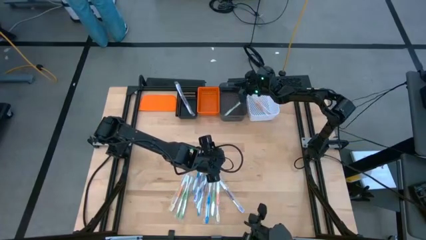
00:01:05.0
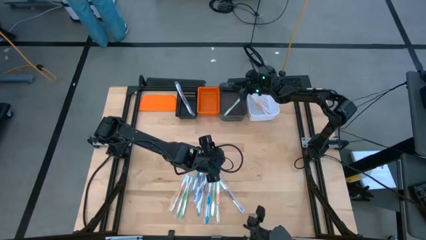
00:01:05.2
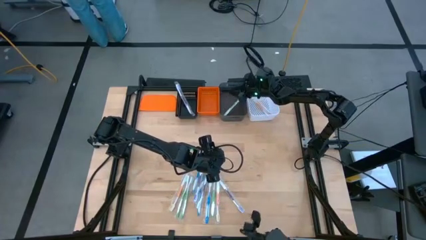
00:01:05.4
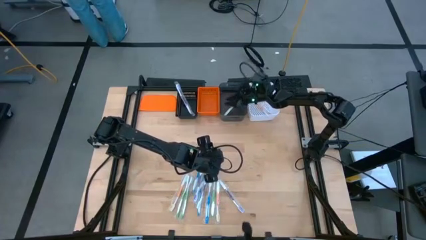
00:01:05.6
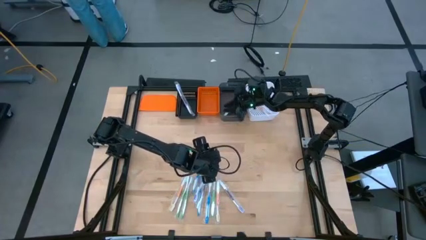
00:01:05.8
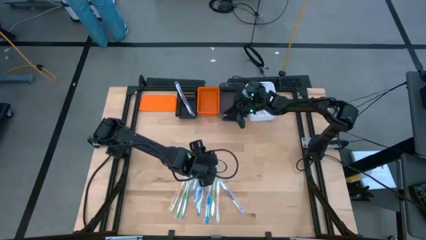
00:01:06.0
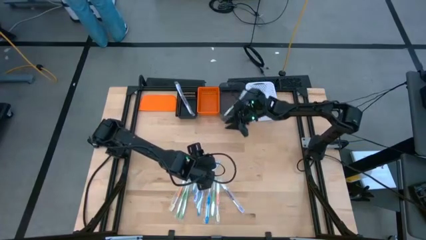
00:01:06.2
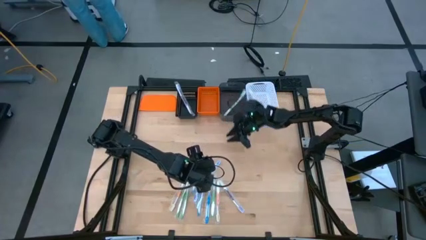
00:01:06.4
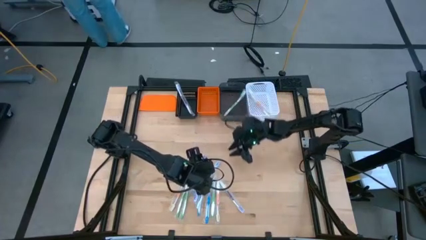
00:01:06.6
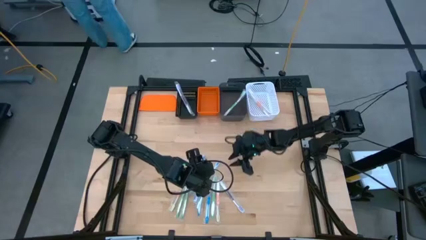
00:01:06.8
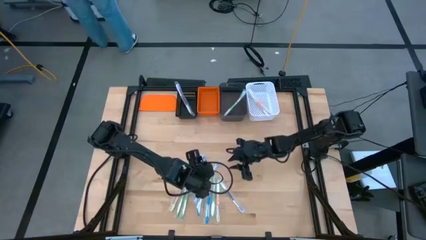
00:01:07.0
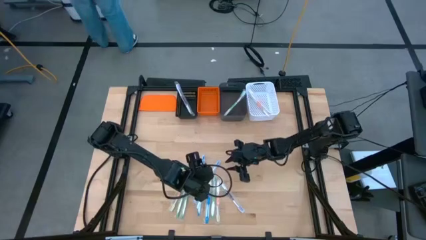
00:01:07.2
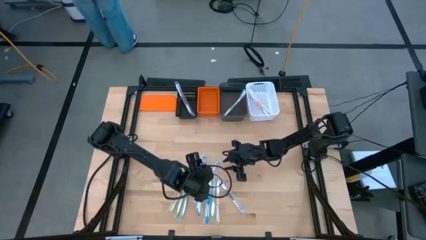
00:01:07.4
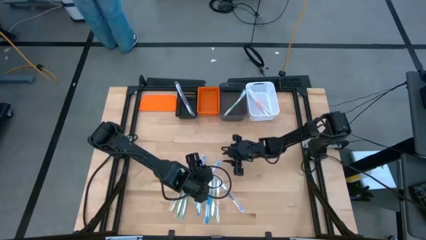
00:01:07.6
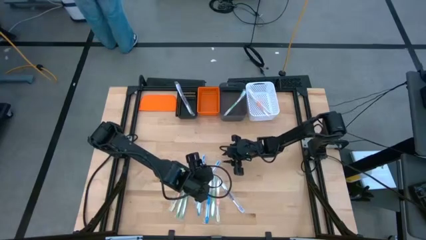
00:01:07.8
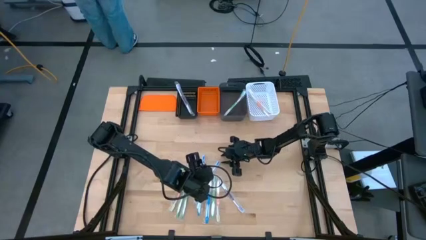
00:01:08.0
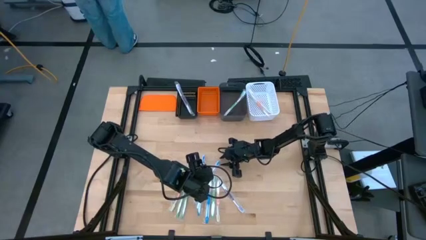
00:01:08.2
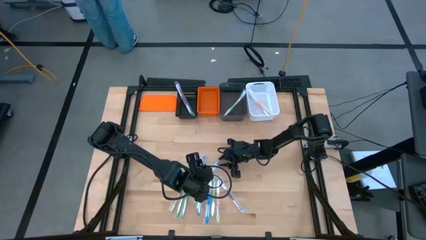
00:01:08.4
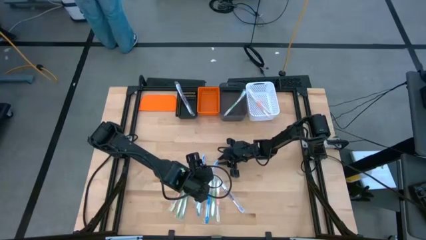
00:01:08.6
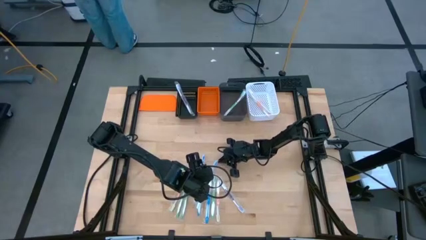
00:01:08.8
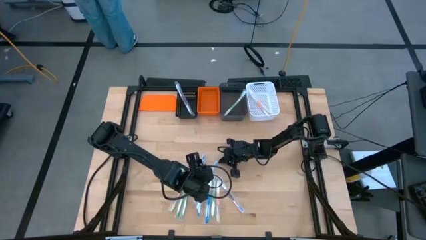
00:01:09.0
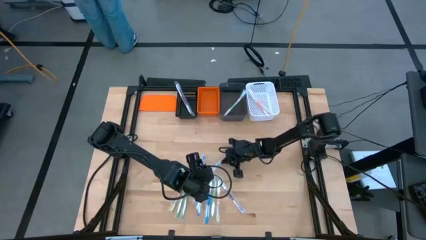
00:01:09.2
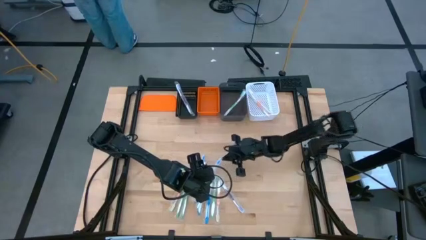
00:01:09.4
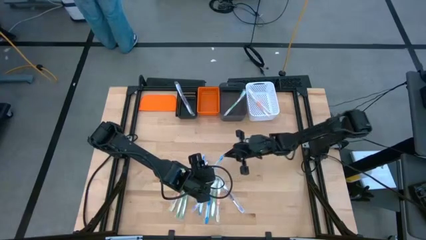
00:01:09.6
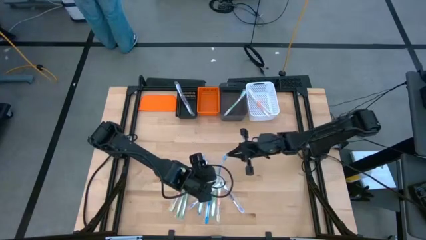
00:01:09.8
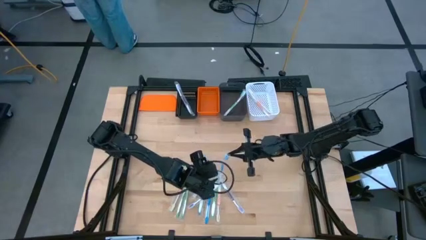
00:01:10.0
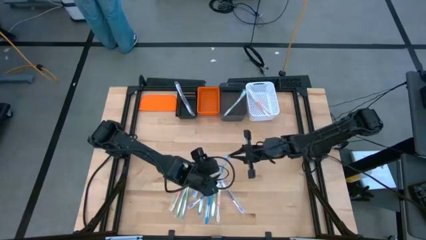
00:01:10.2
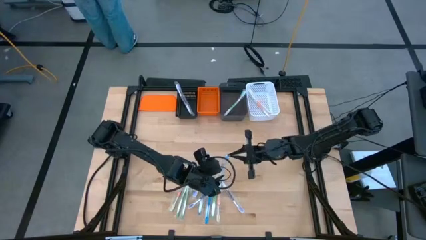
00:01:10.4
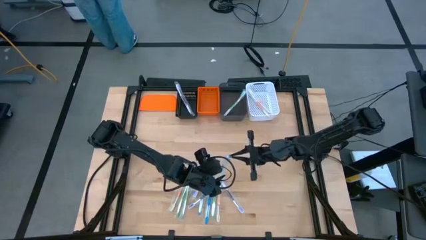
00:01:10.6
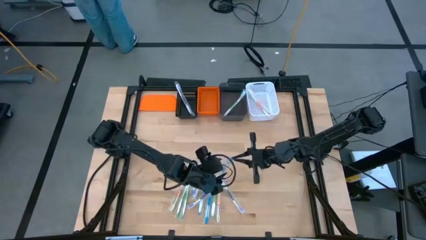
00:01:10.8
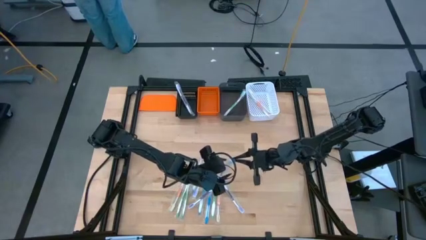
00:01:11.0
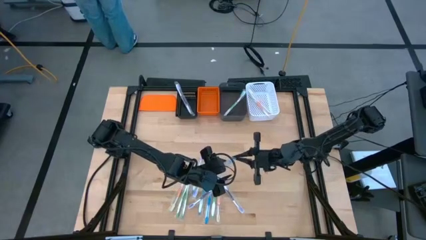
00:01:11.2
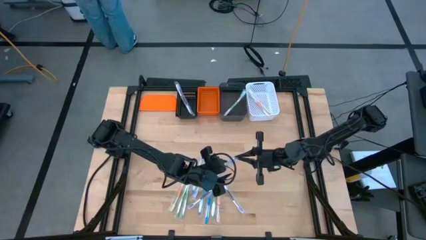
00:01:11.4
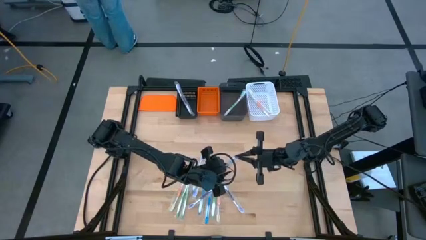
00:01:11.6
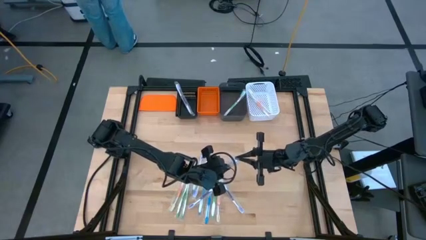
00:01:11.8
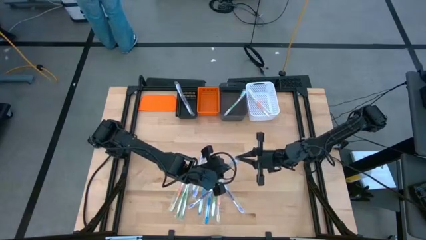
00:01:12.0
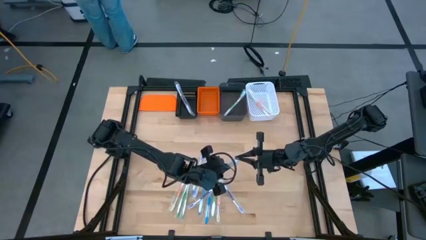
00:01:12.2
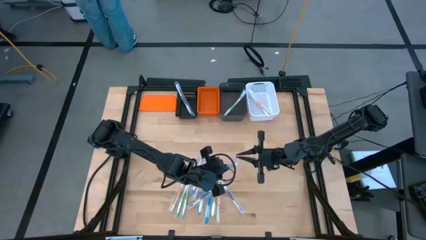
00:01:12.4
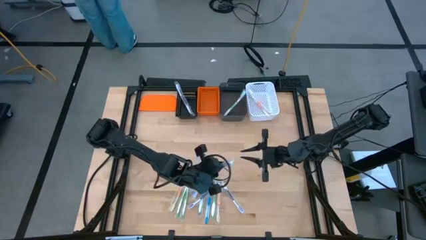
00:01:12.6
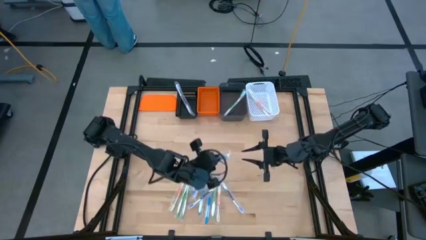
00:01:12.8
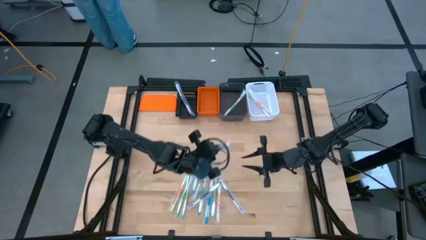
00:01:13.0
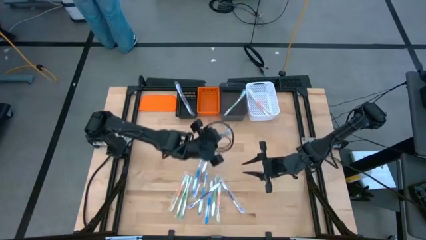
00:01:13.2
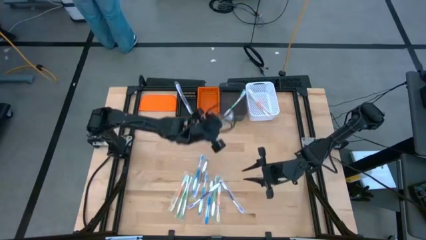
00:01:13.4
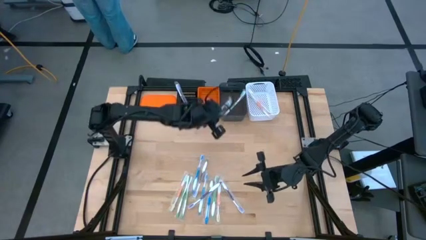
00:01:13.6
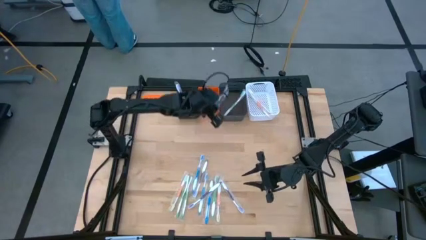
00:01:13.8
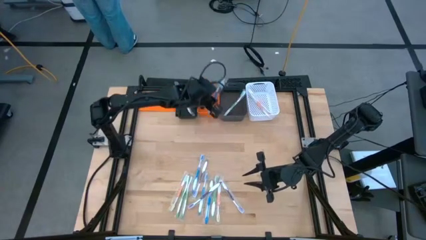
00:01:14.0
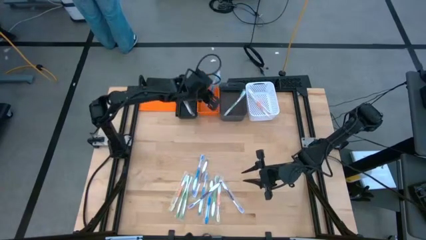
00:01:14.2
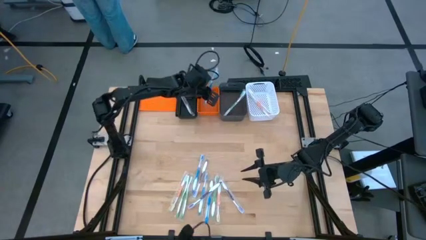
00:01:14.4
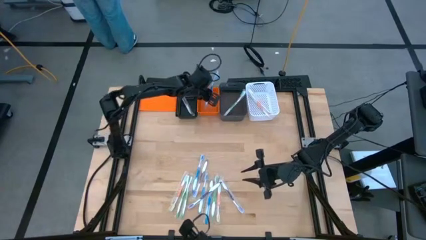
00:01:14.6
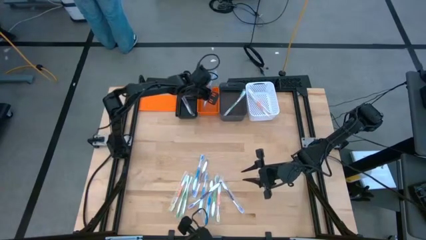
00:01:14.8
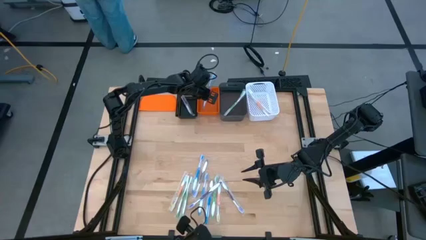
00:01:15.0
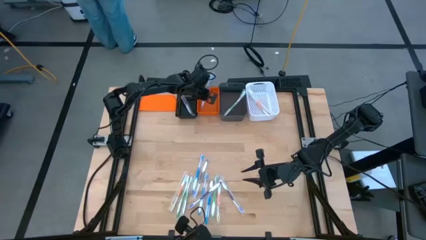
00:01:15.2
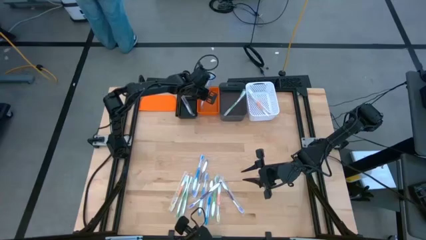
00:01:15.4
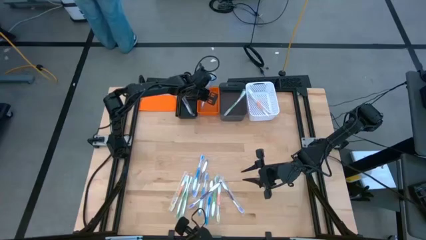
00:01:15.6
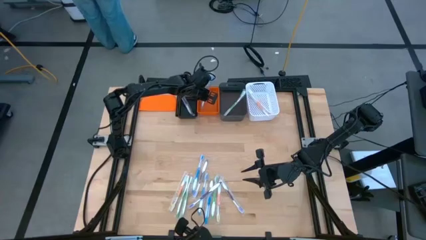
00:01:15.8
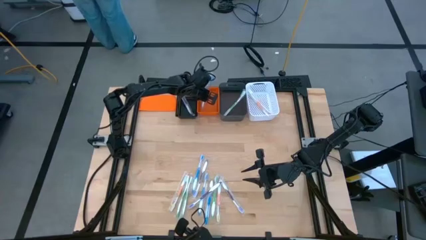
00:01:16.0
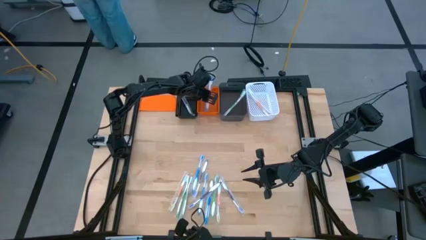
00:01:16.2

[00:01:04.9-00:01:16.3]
Task: Pick & Place Toothbrushes
Put the blue toothbrush into the orange basket

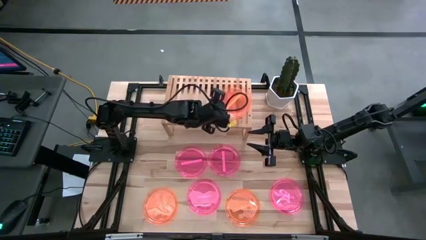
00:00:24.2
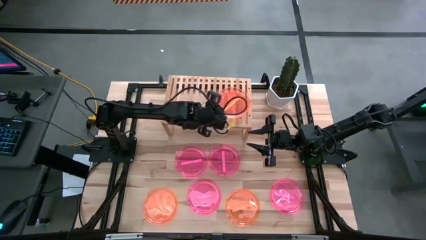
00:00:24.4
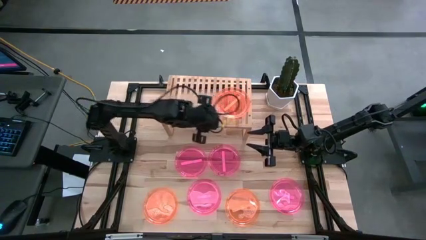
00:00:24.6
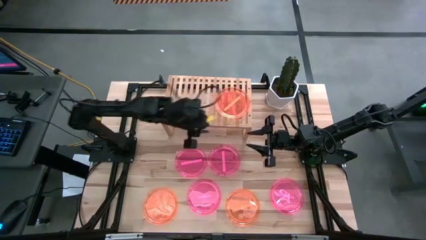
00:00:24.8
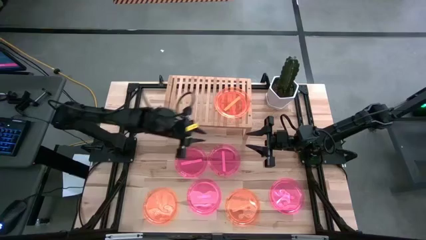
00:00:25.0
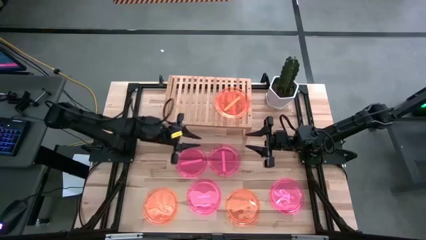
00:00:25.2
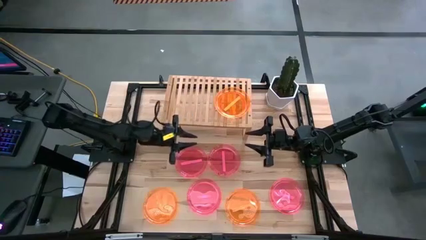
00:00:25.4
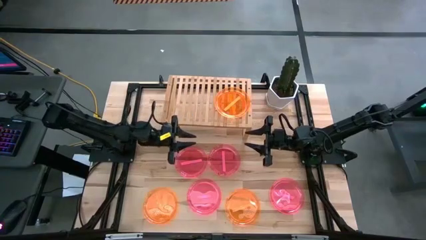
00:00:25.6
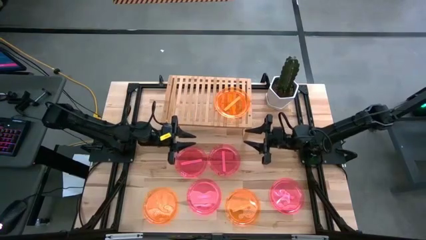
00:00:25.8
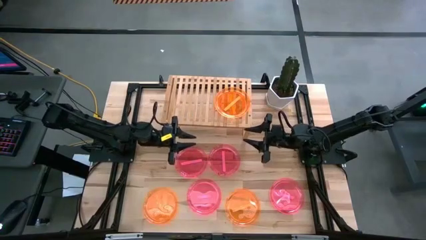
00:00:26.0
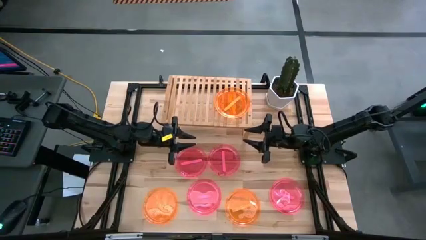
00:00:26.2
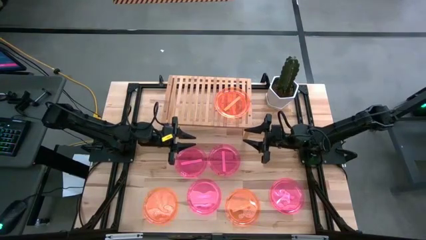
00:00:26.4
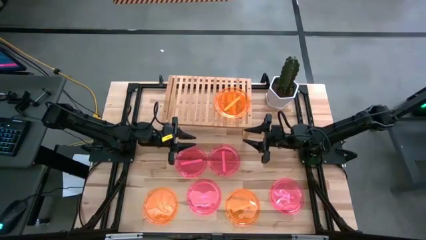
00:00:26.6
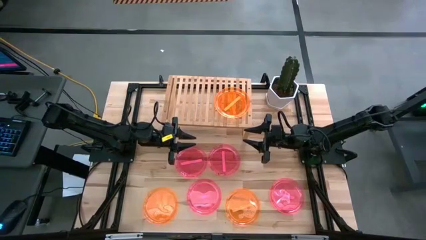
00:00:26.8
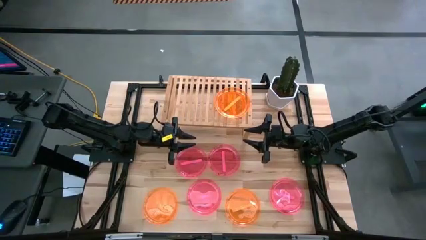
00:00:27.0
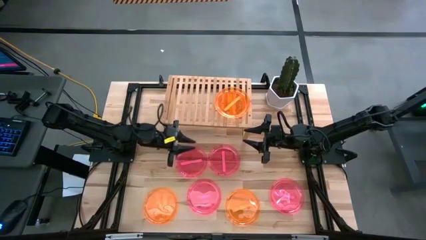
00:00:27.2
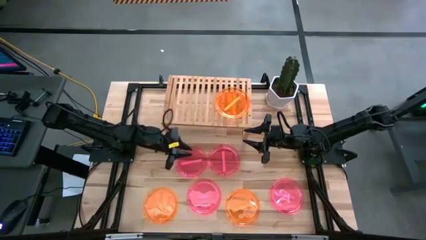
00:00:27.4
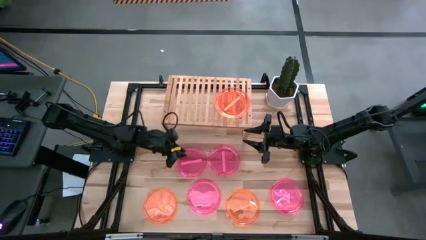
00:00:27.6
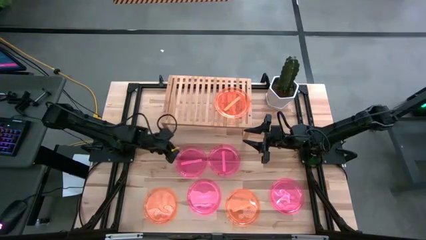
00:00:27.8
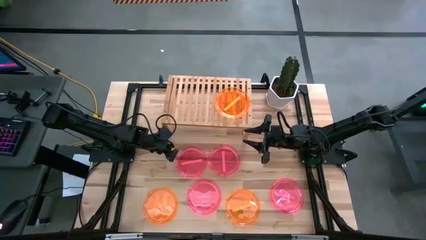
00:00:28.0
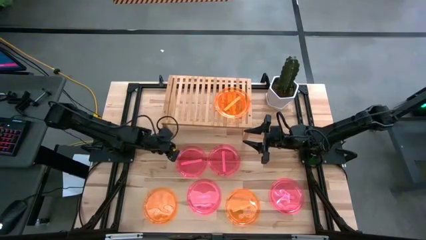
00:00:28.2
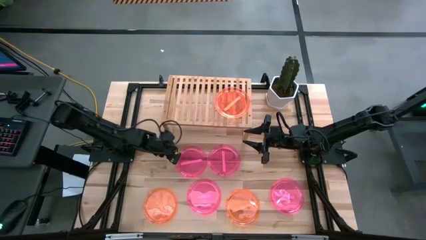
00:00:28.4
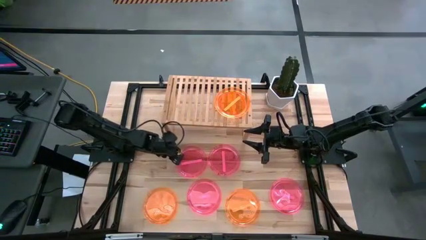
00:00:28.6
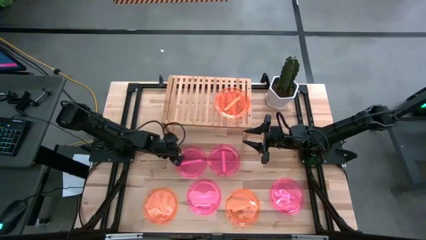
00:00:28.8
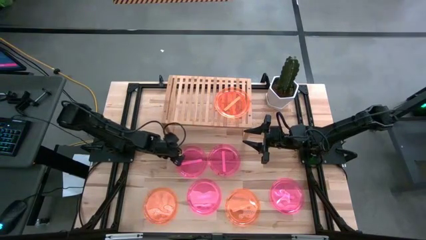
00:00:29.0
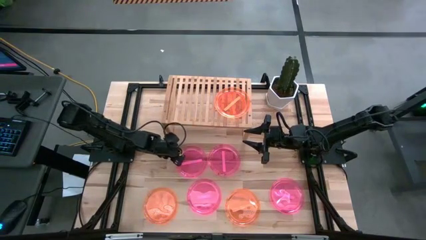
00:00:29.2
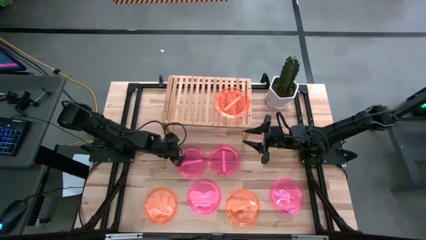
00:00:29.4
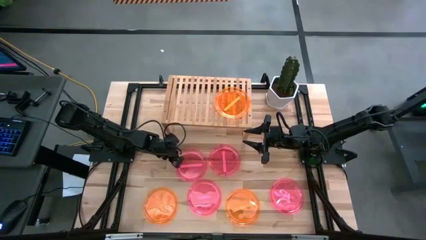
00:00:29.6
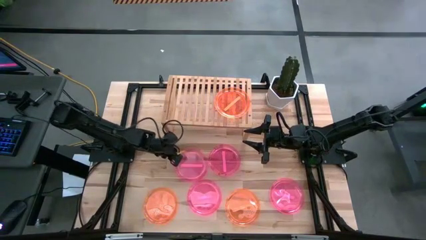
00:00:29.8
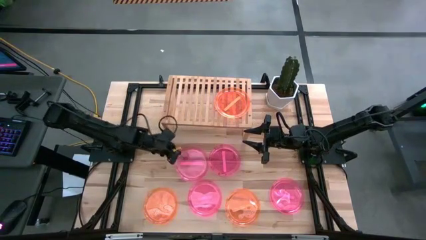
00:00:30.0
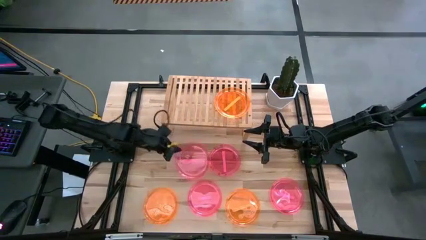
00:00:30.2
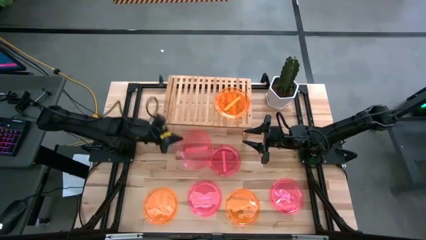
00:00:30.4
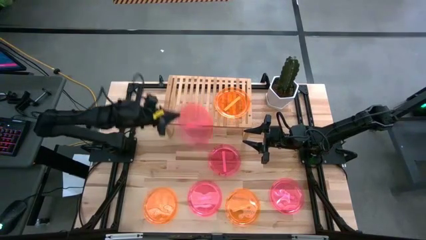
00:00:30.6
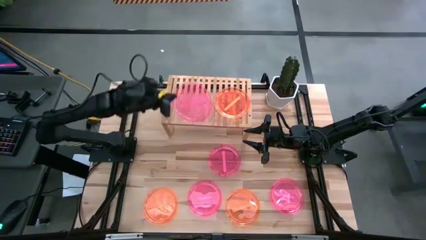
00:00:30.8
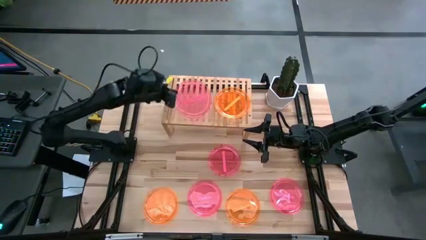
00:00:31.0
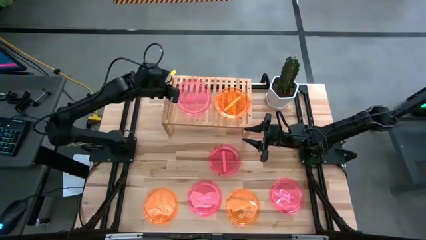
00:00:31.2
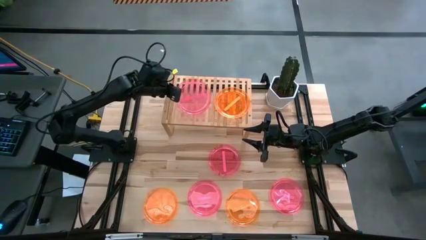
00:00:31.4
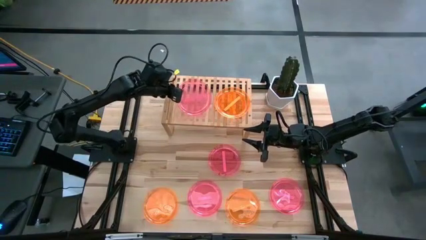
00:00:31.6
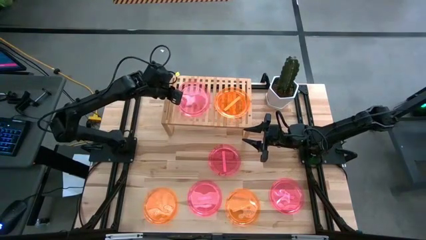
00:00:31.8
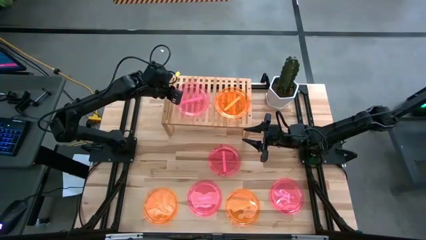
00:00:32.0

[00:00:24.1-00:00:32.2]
Task: Place and stack plates onto a shelf
Put the pink plate on the shelf
